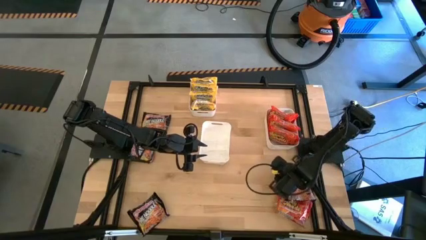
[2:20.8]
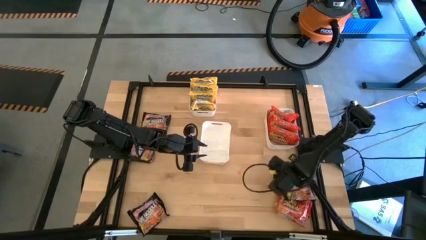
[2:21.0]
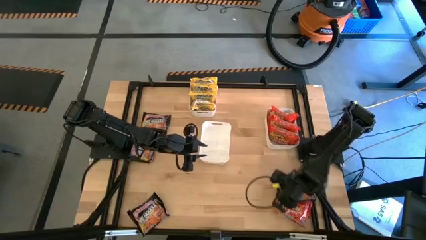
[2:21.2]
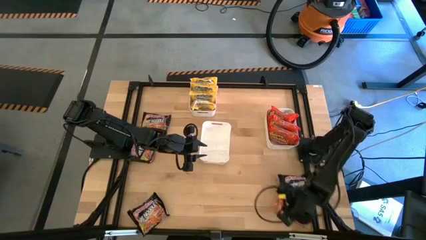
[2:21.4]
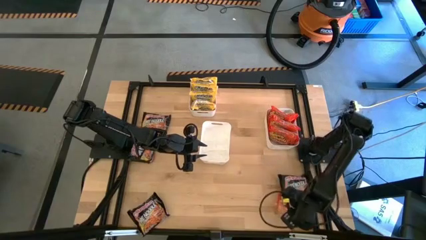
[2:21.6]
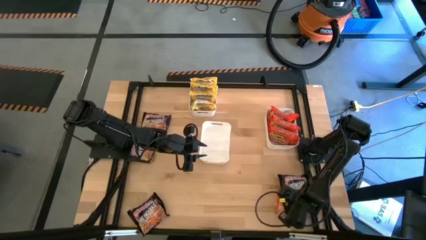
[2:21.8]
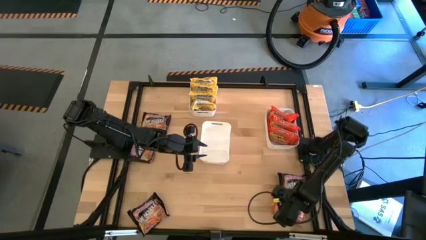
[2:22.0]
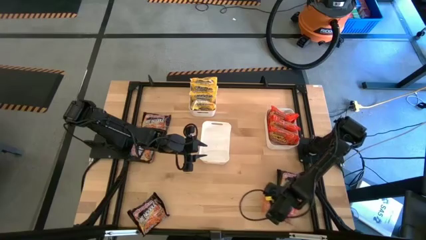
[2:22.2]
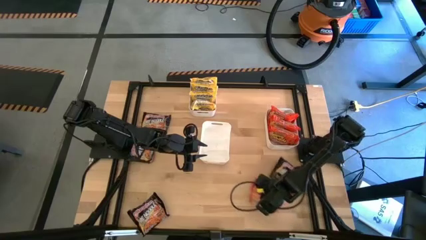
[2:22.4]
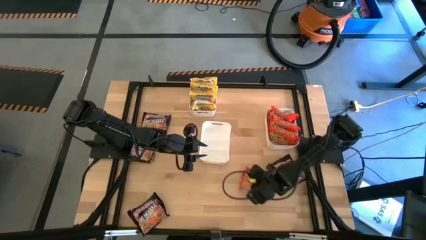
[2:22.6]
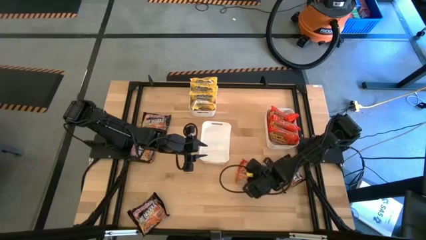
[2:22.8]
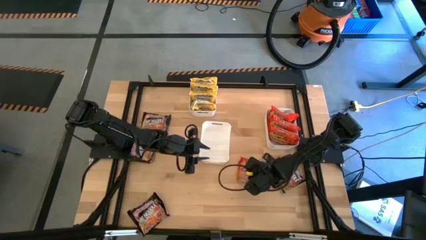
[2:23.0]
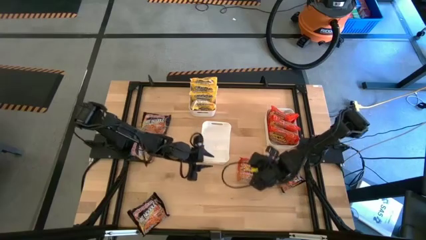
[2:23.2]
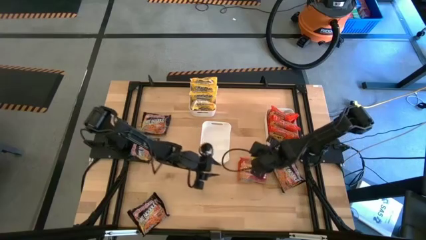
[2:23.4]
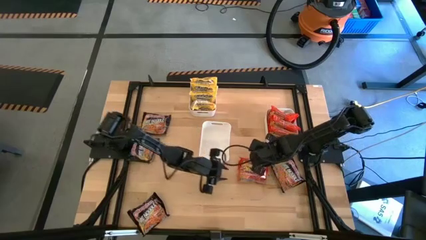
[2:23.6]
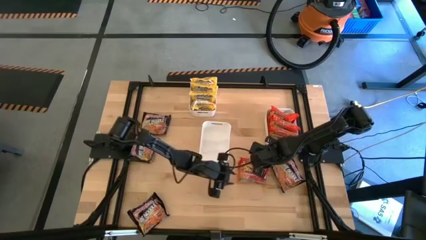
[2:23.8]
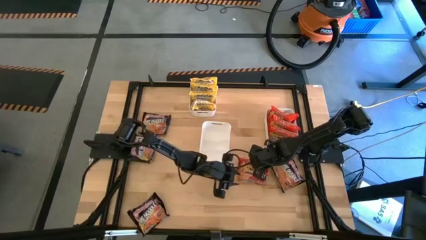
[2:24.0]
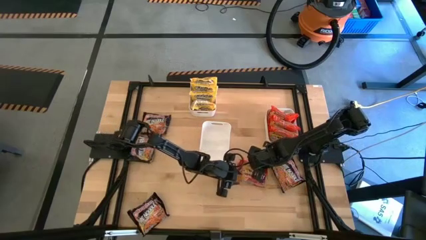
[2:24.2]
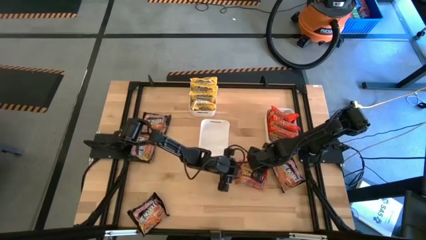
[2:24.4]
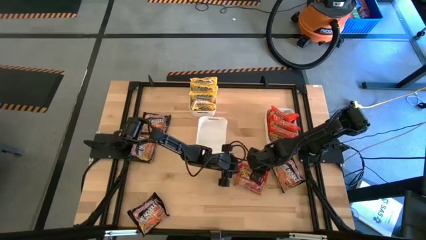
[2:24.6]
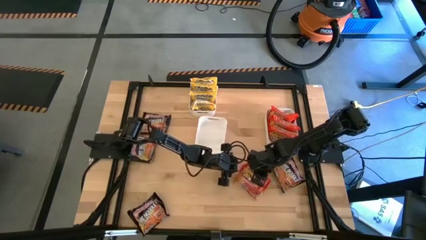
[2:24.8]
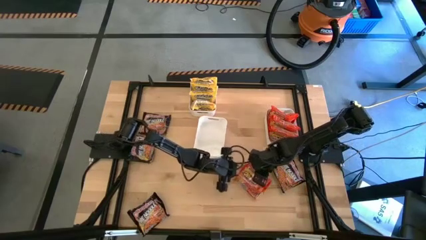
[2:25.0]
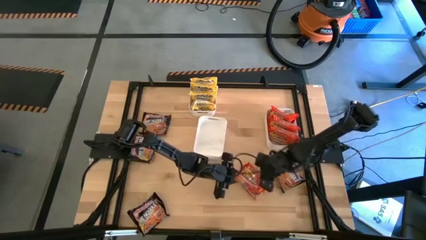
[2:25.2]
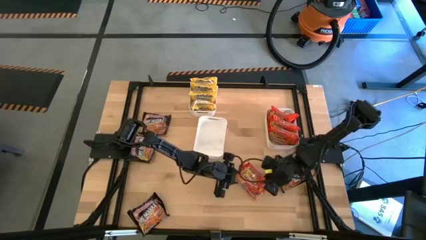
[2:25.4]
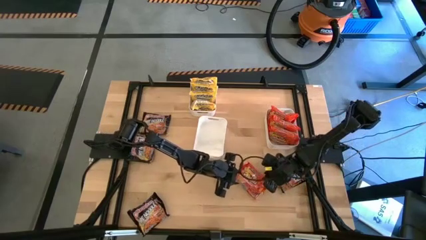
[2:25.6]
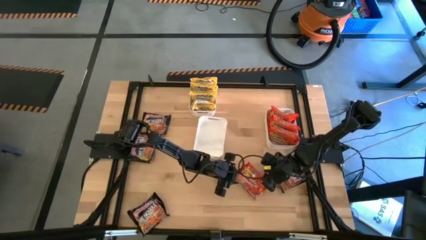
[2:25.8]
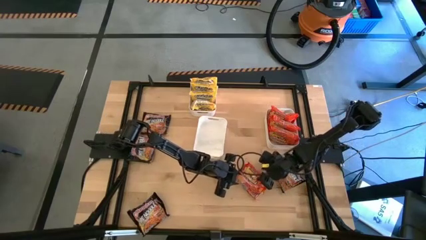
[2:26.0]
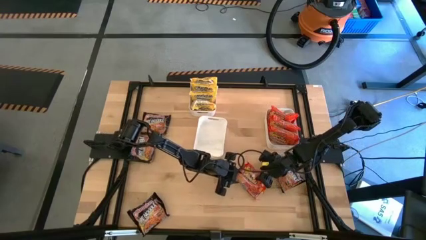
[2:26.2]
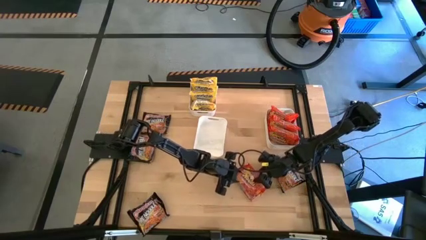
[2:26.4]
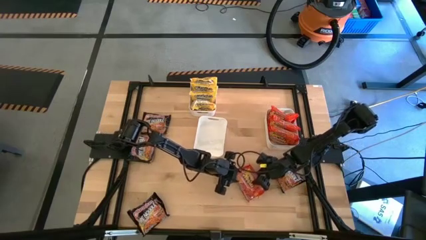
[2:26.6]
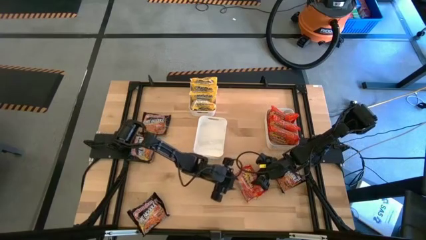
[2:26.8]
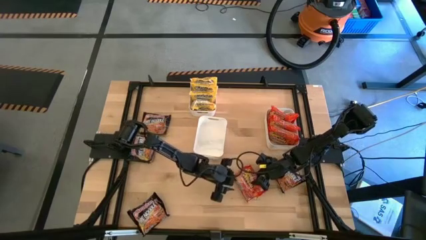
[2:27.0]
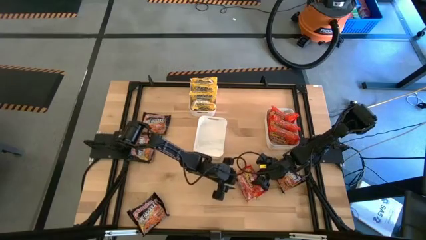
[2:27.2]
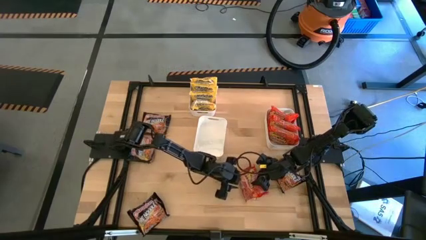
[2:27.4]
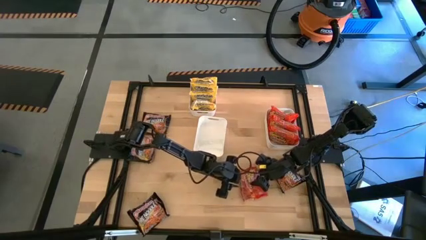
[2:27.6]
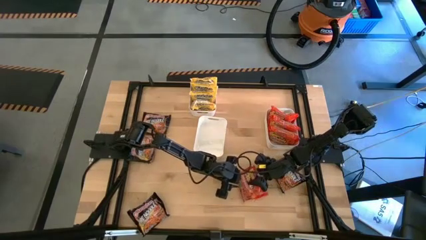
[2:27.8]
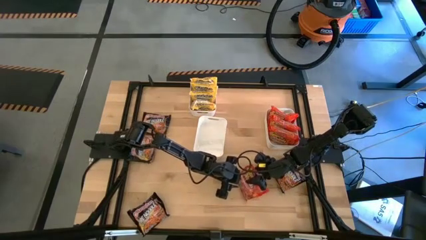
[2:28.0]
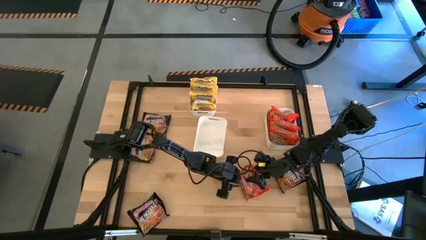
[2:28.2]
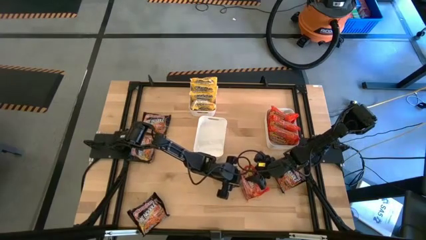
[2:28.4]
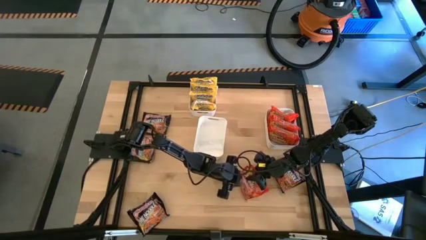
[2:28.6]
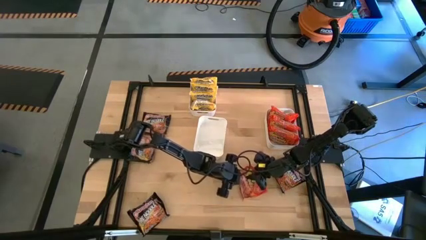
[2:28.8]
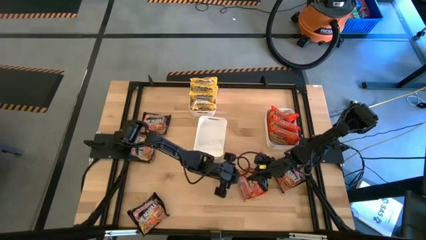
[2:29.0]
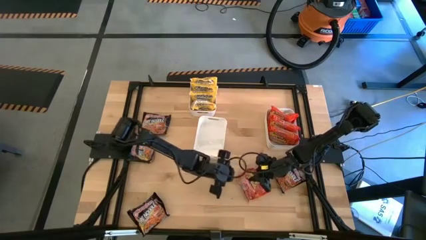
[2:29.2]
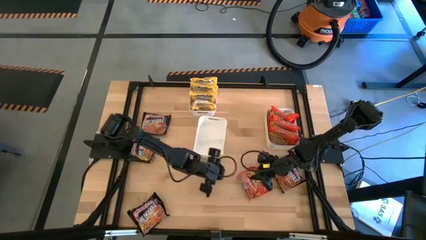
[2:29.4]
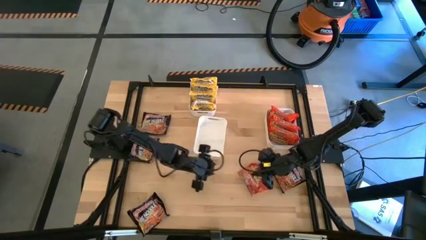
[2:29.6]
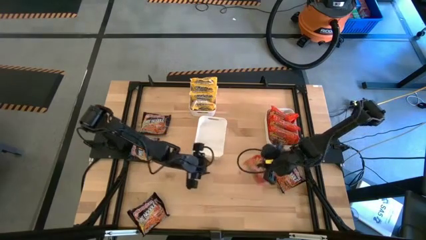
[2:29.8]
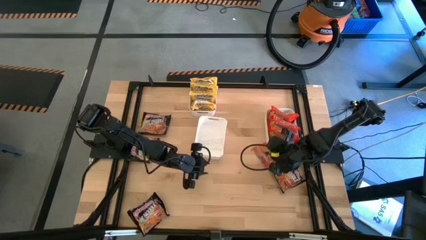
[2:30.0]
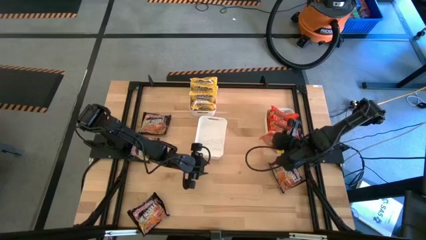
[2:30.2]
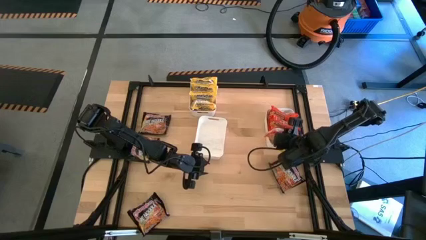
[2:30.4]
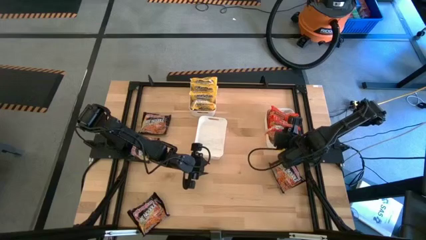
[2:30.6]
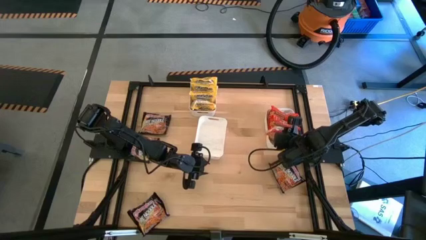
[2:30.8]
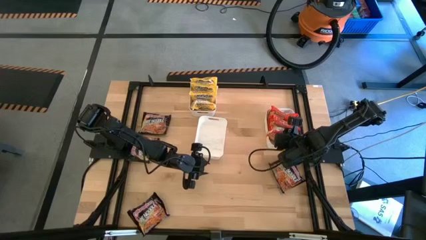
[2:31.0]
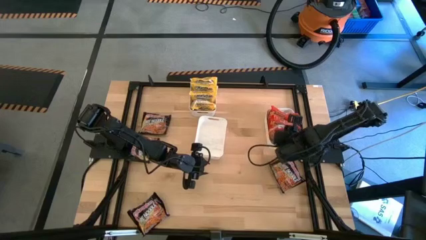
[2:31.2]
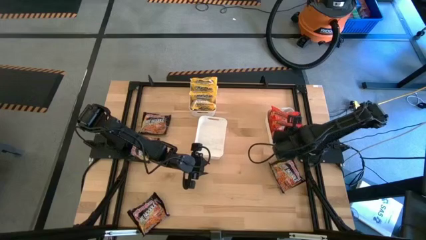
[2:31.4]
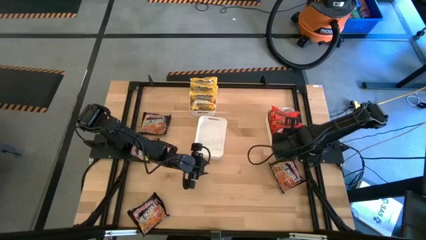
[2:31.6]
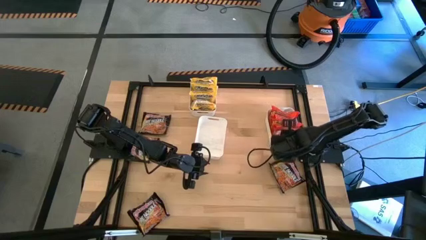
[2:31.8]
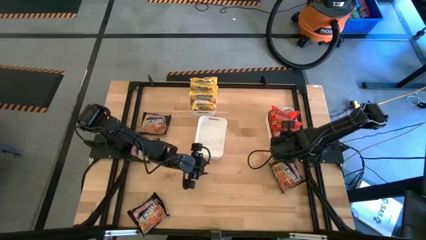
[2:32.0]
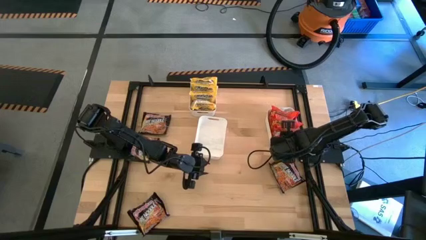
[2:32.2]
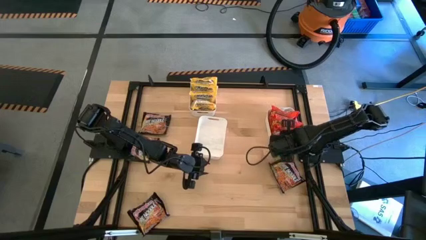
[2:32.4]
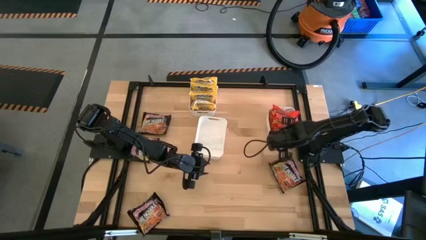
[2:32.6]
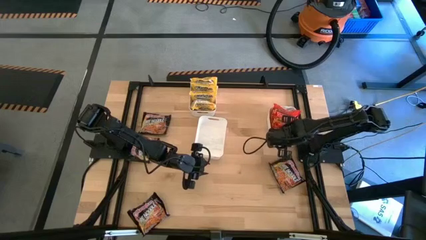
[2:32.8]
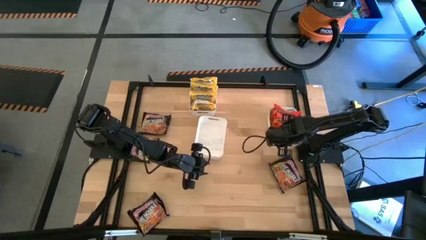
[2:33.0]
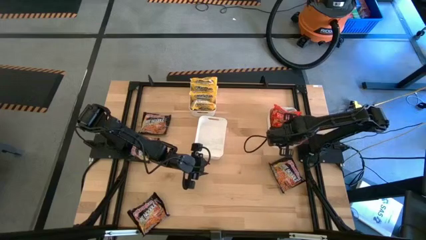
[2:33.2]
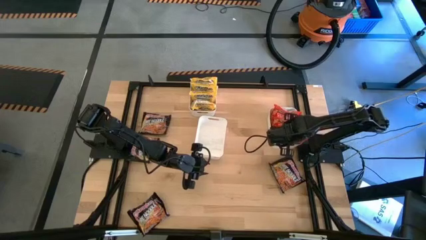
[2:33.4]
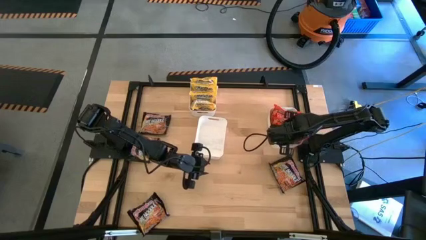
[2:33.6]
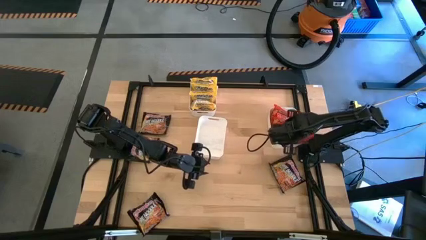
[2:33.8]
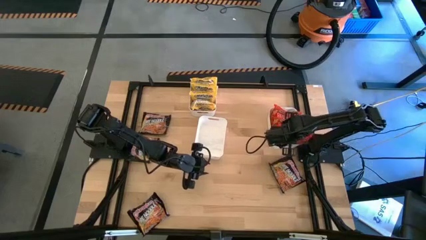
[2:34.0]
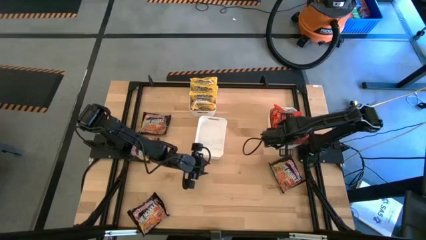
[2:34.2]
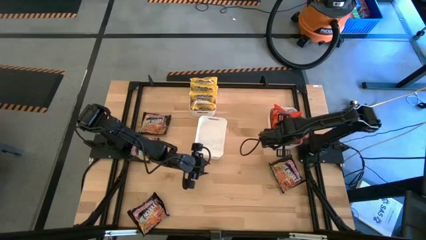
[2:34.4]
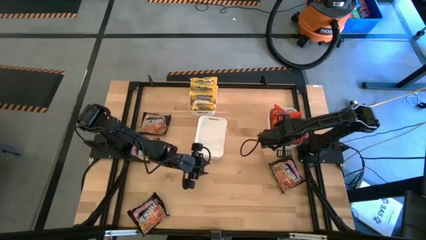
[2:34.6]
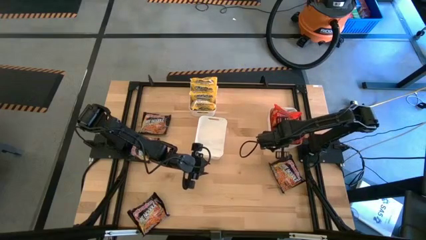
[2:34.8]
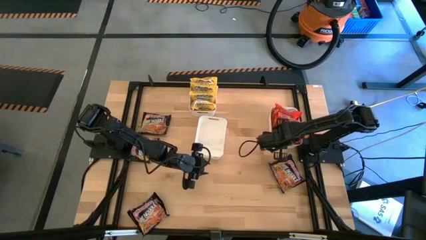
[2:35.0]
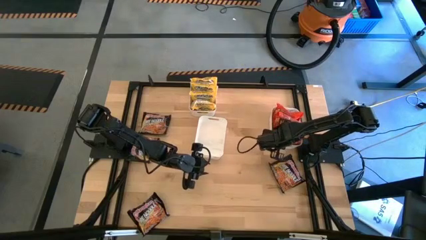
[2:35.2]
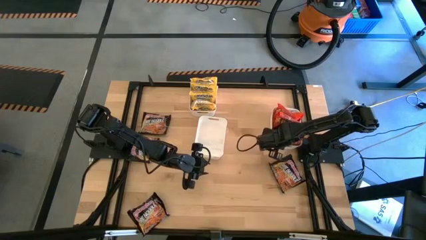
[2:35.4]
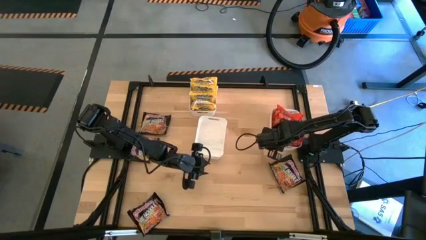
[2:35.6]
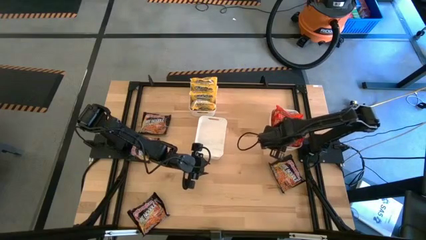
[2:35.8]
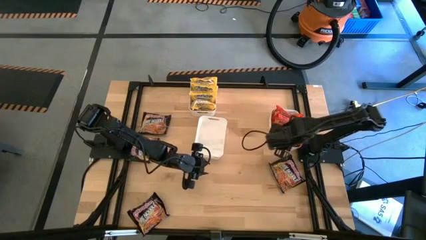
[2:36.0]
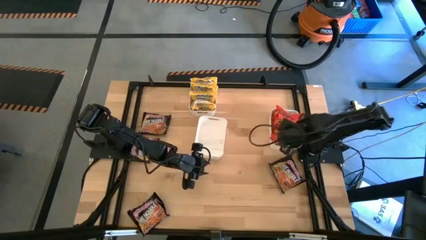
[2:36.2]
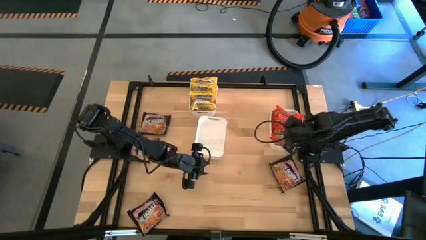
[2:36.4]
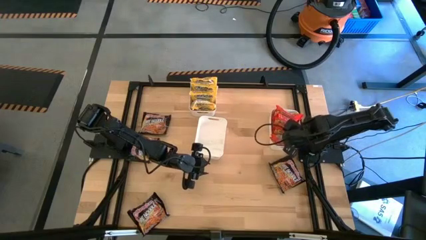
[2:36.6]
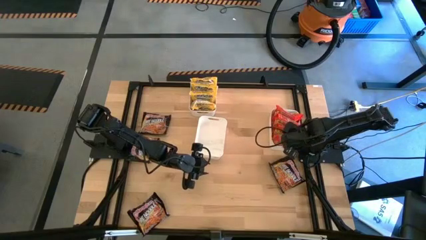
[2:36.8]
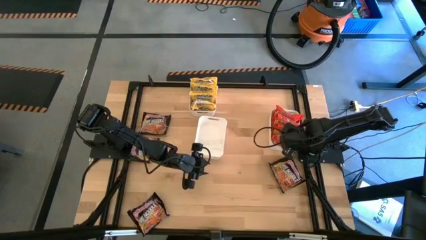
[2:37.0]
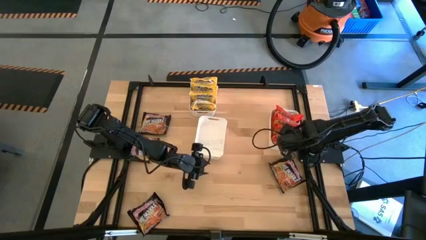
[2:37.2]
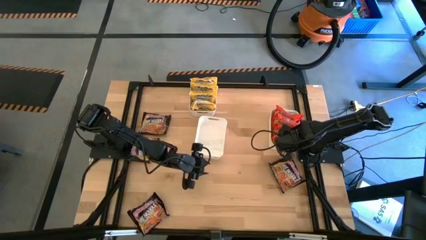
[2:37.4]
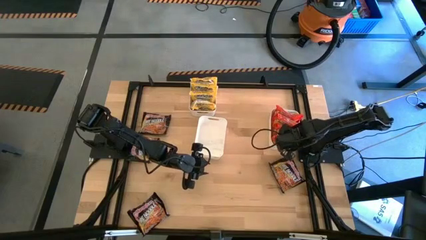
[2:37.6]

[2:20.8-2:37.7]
Task: Sort Maruchan noodles
Put the orange noodle pack into the bottom right white bin
